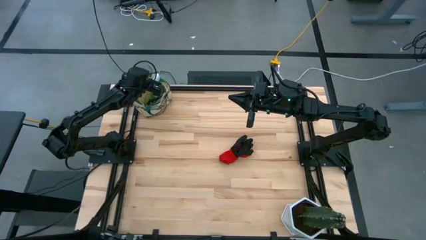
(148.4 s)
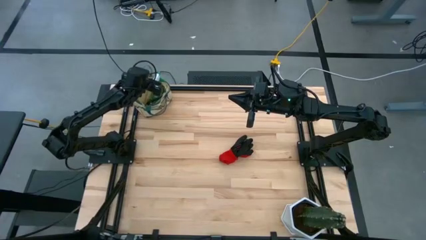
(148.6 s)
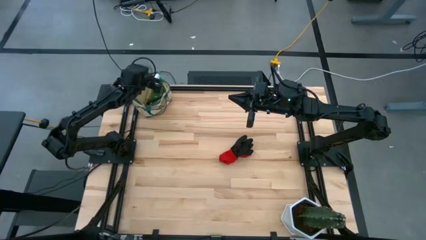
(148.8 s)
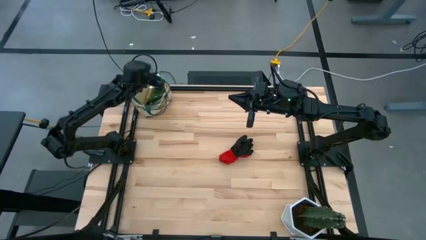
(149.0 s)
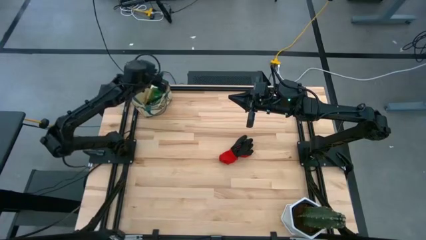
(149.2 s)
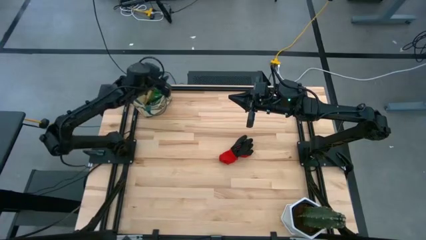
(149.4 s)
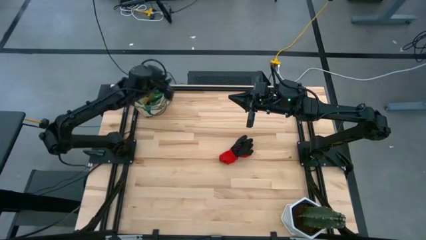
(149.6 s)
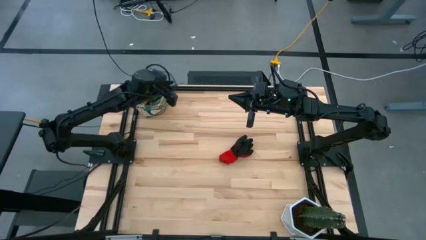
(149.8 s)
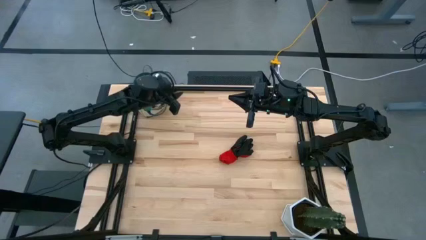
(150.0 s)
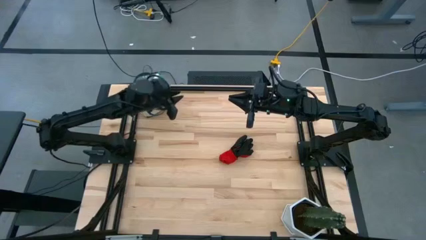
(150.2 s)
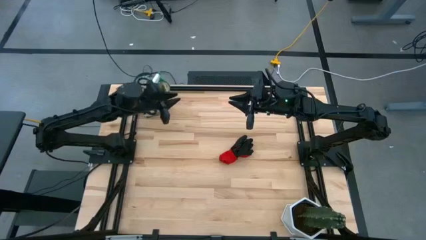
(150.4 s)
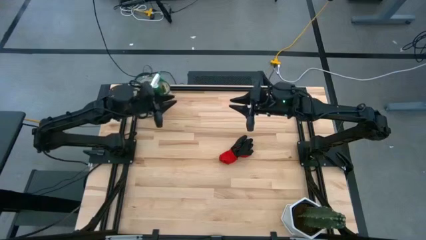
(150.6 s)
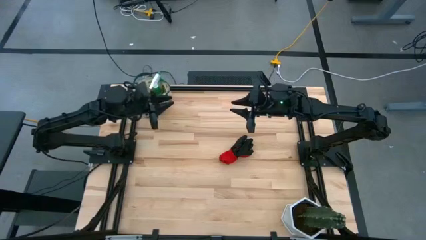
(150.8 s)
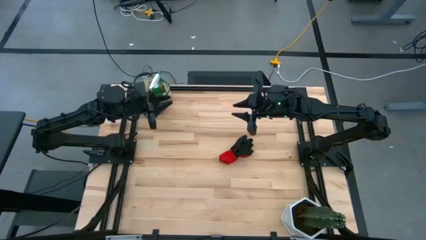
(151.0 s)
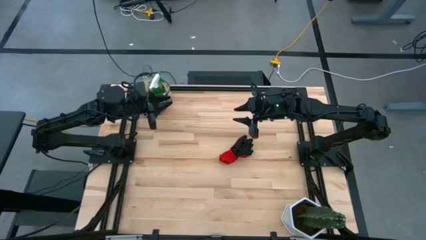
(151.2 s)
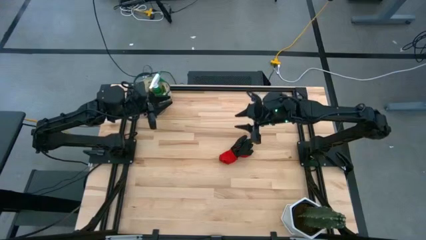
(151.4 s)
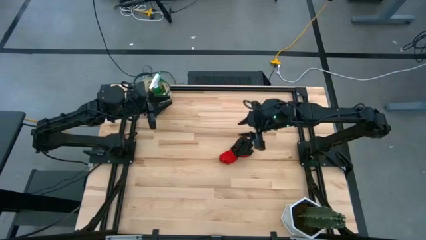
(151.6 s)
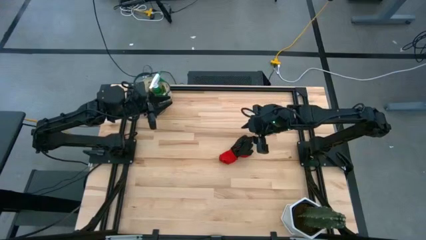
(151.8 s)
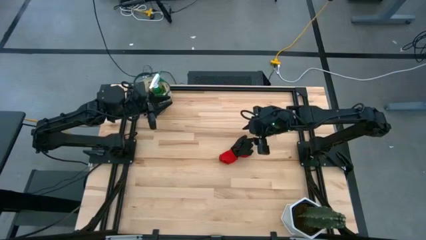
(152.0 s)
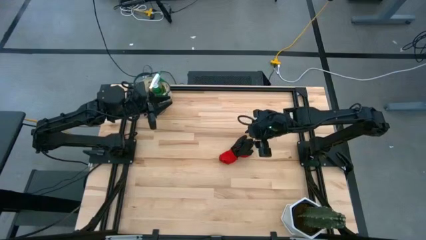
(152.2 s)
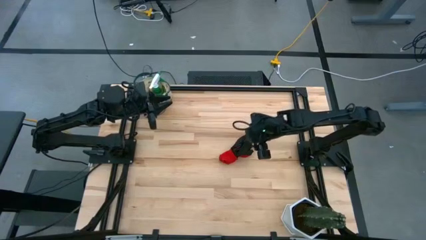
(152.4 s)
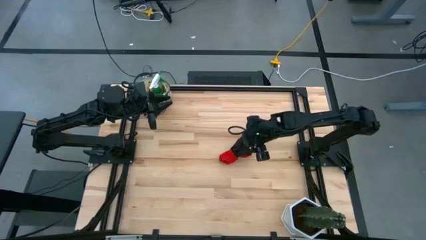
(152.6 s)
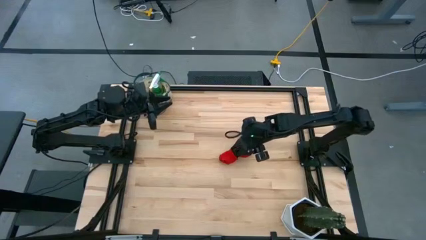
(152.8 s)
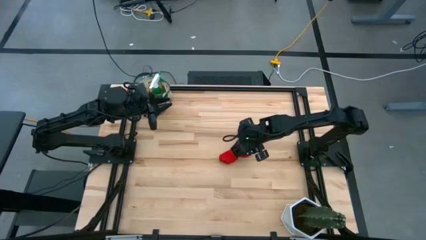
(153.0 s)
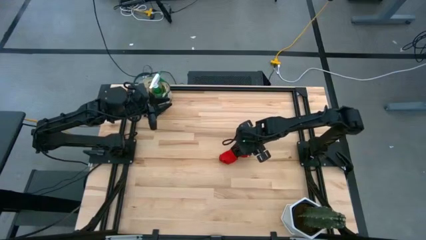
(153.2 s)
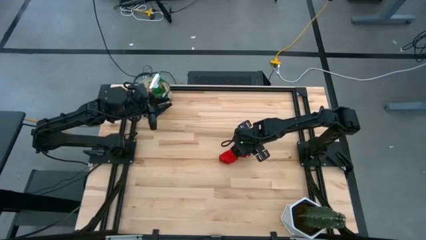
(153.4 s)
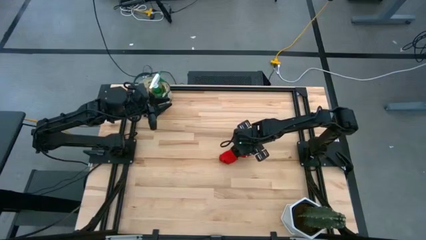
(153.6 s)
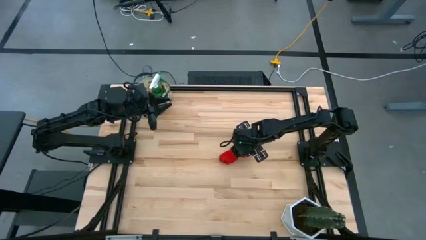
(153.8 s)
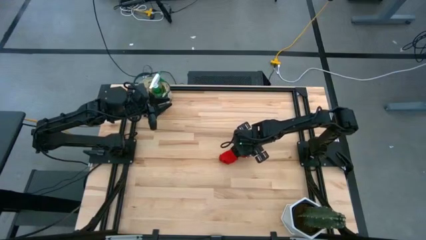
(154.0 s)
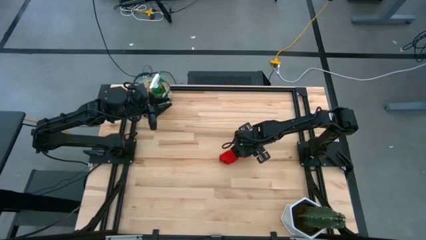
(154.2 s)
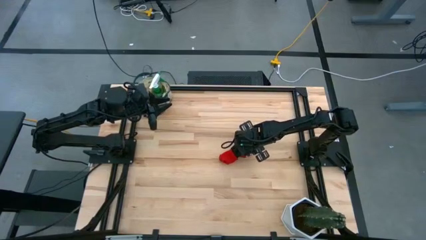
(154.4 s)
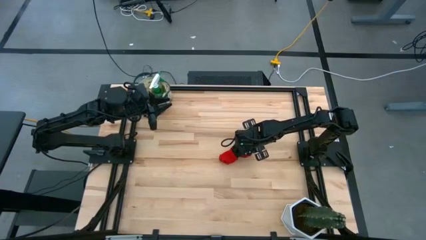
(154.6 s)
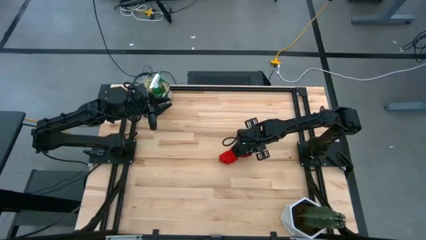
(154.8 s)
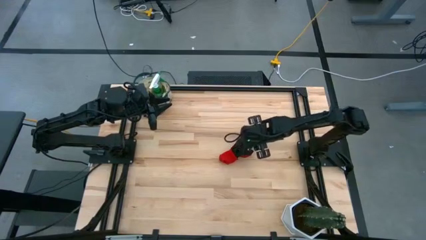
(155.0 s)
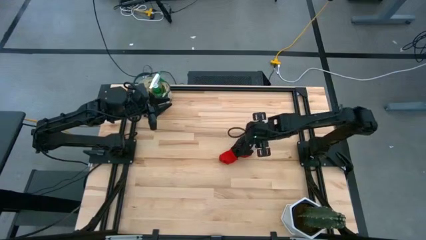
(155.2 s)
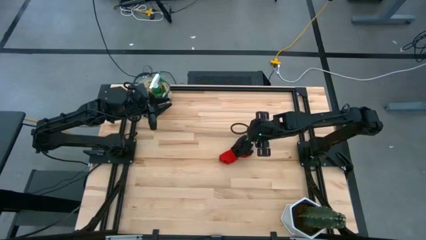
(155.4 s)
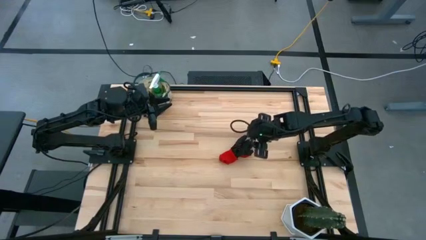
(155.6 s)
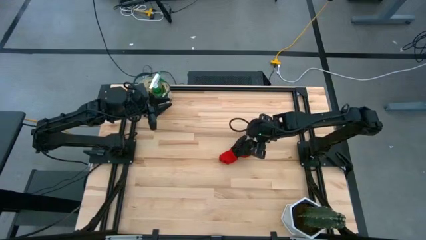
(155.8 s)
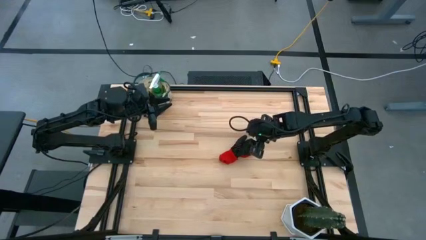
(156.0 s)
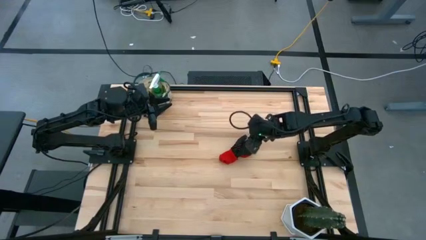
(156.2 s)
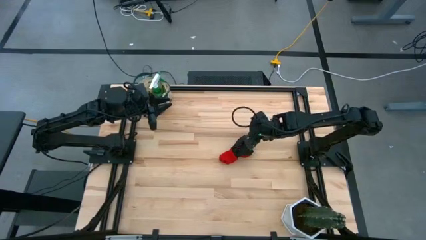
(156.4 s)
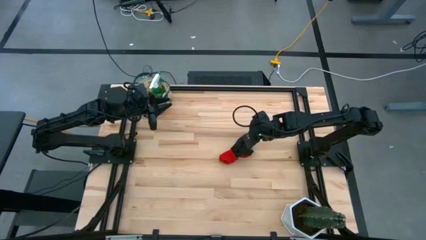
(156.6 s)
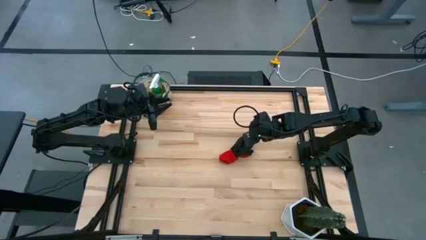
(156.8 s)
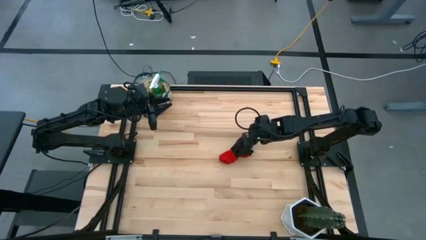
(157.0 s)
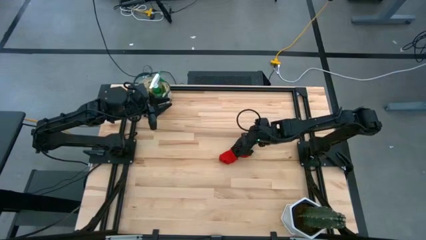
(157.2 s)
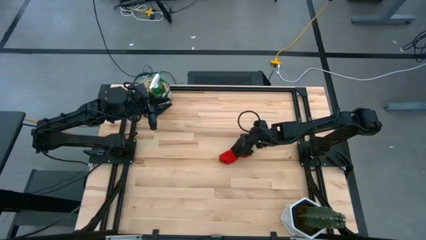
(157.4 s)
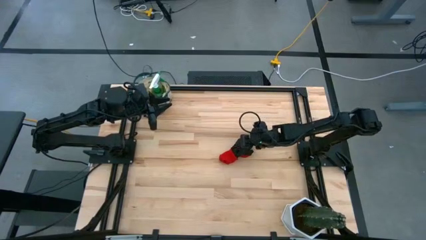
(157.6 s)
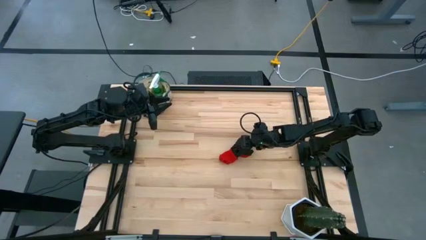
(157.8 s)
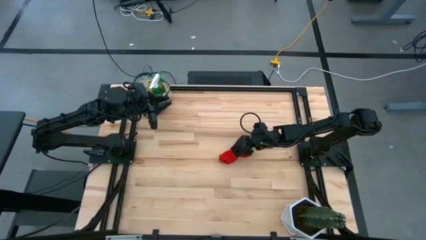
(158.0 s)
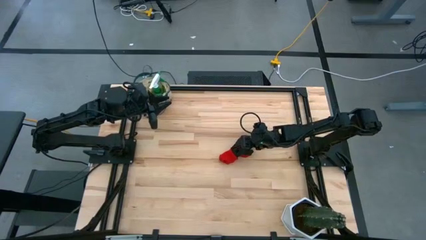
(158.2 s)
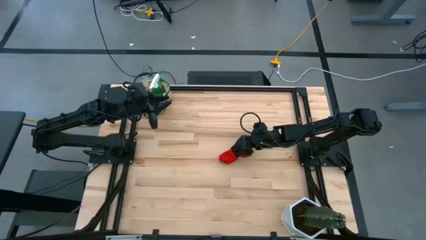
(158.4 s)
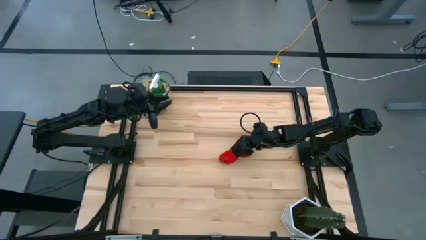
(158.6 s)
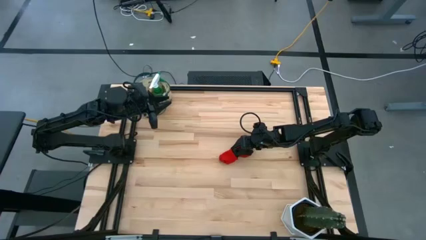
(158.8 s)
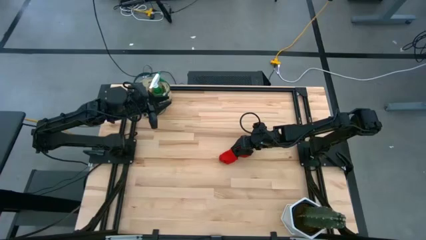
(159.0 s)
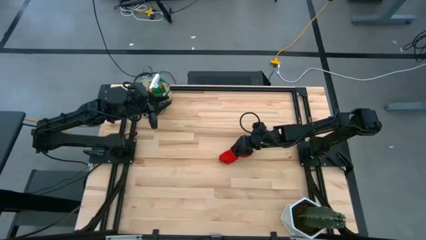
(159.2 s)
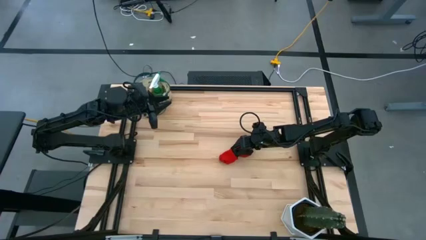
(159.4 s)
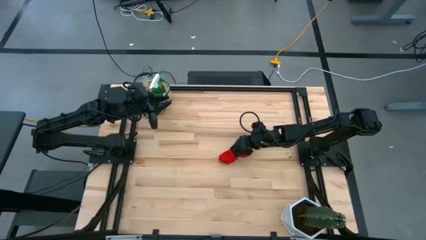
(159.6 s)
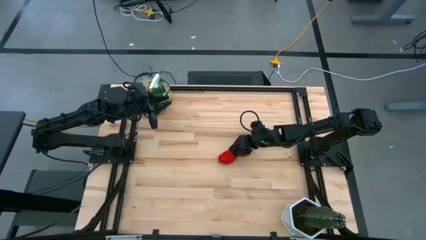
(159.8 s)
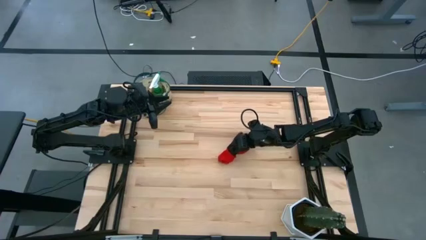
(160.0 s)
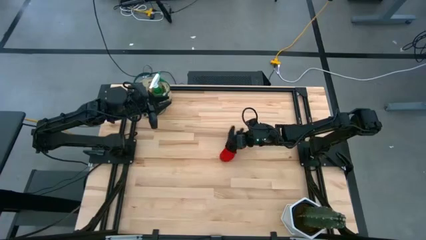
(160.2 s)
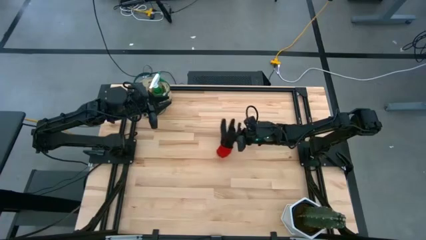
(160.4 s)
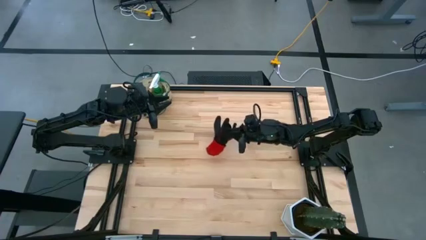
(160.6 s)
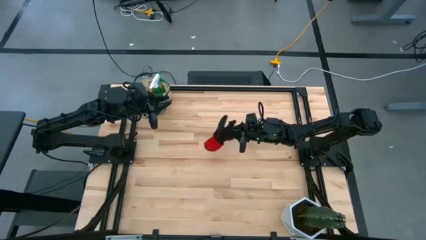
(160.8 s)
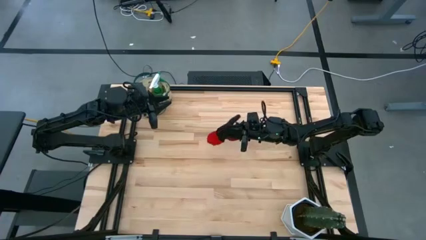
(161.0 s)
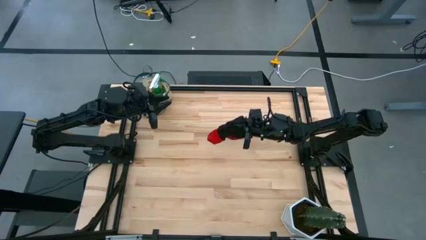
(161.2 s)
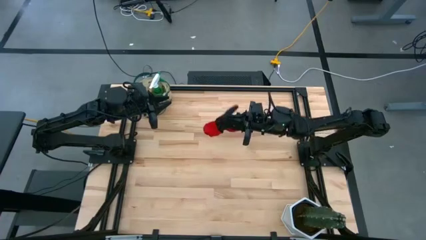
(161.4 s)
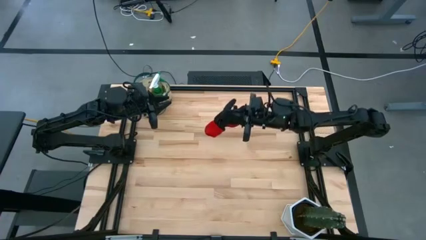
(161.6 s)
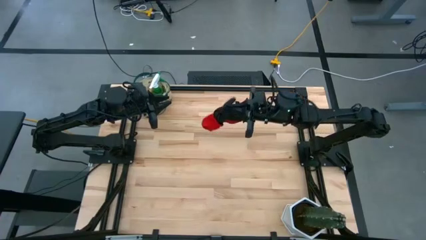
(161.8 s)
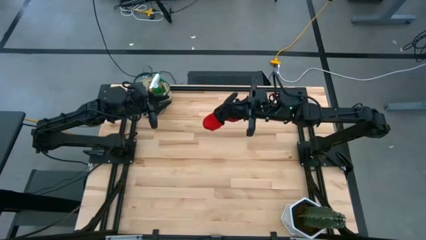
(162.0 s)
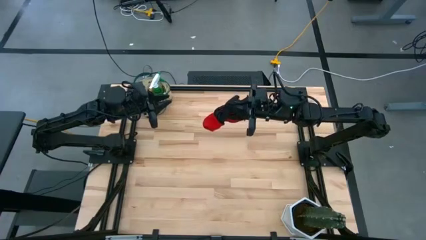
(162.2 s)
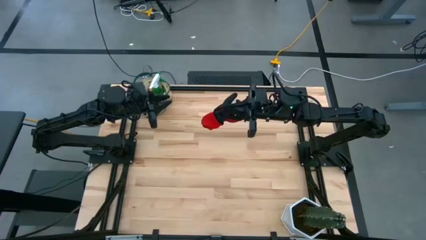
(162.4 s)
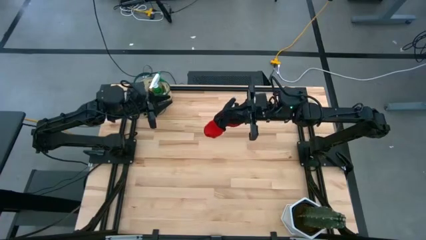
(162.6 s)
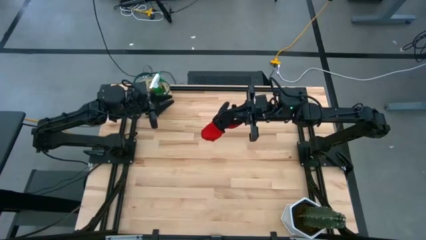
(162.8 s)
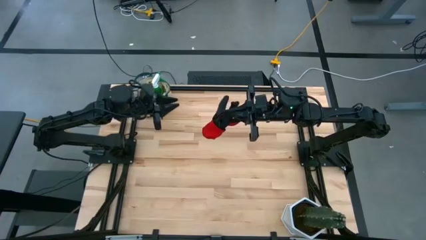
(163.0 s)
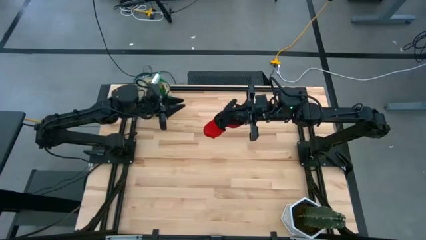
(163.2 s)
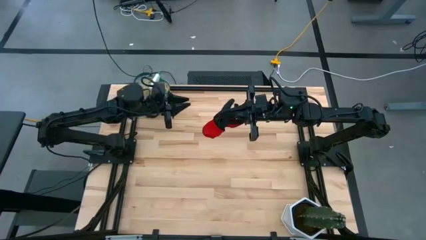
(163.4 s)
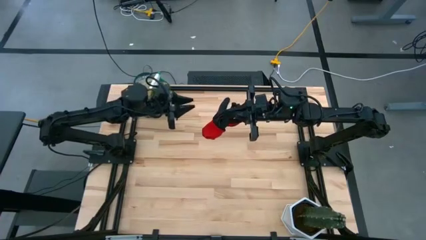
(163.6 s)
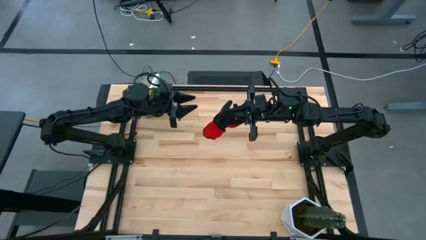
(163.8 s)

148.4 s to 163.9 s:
Task: Pick & Place Garden tools in Gardening bag
Put the red gloves into the gardening bag
